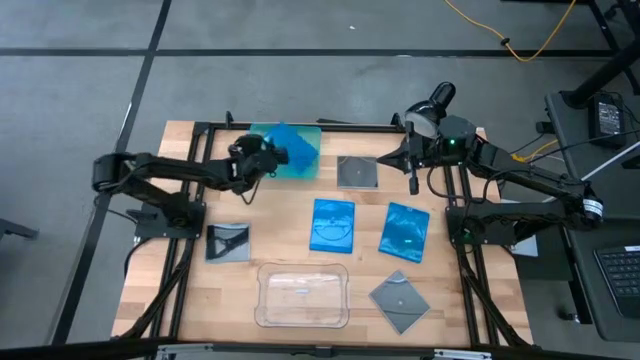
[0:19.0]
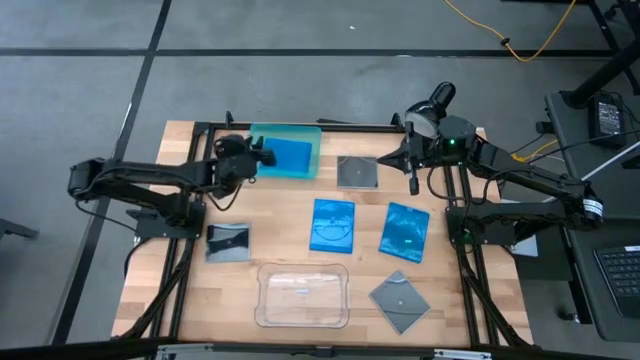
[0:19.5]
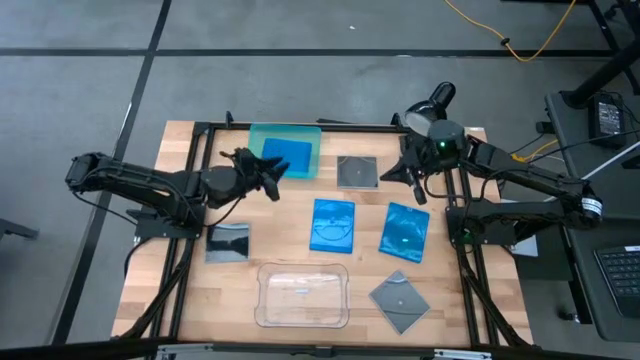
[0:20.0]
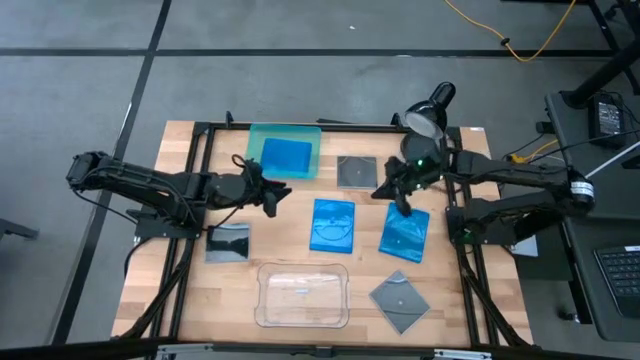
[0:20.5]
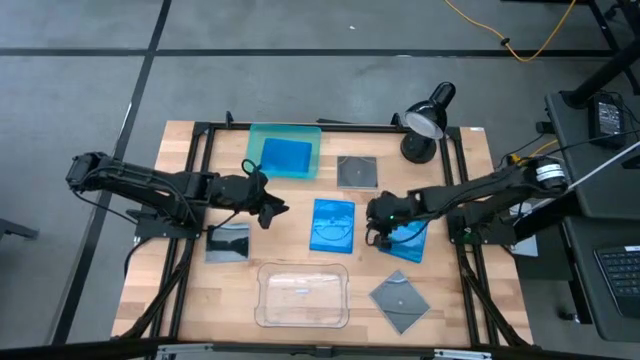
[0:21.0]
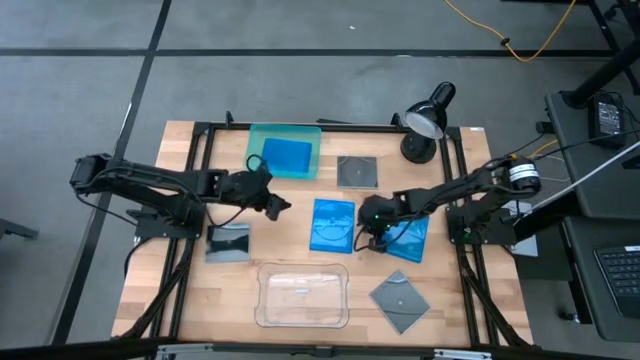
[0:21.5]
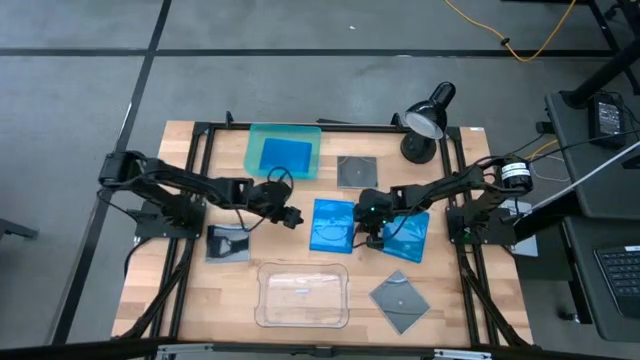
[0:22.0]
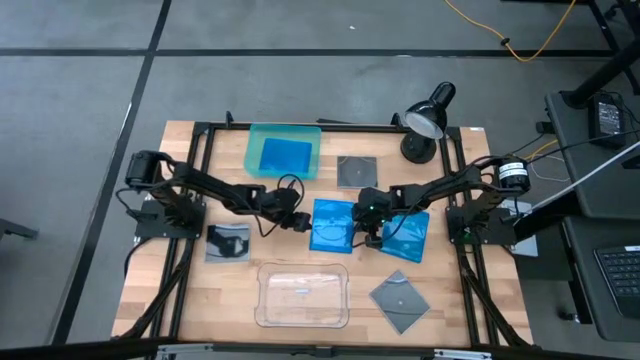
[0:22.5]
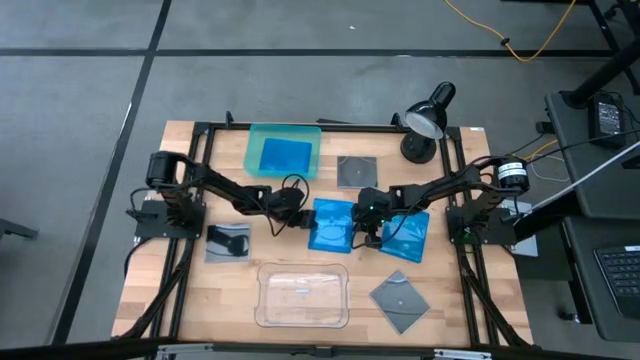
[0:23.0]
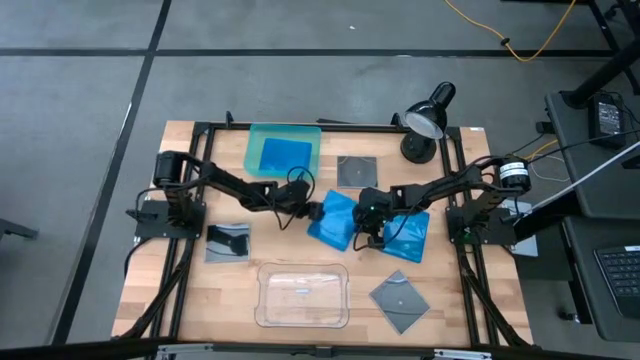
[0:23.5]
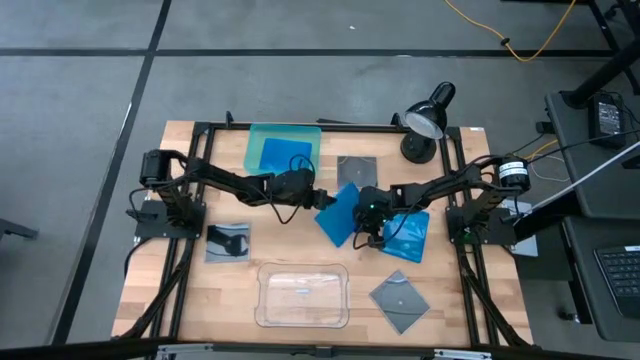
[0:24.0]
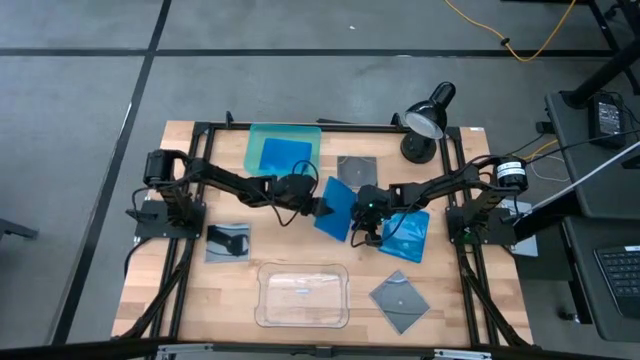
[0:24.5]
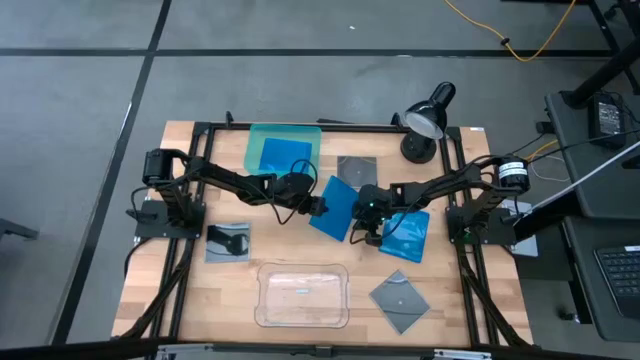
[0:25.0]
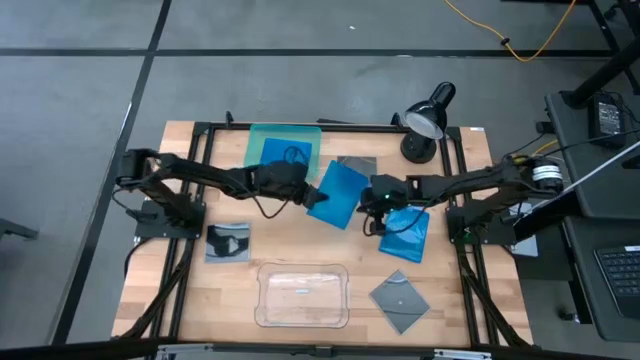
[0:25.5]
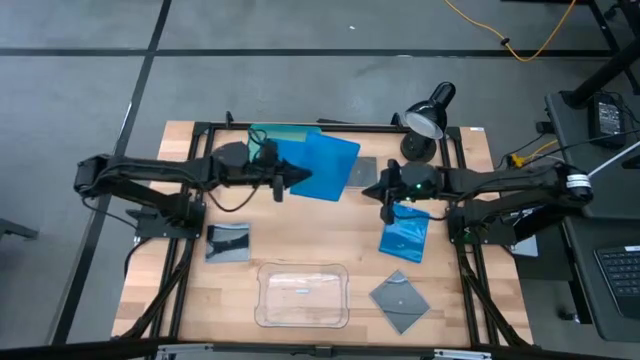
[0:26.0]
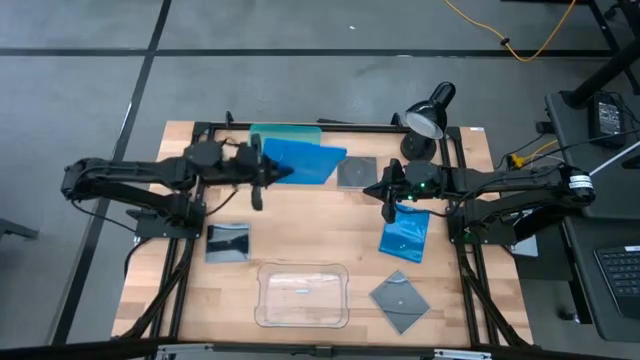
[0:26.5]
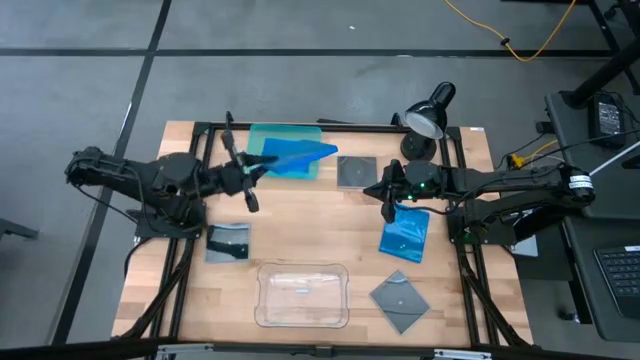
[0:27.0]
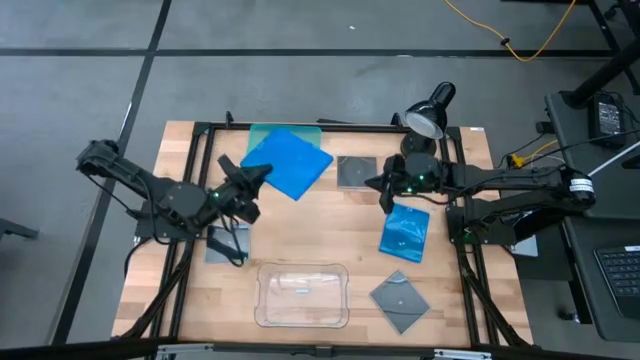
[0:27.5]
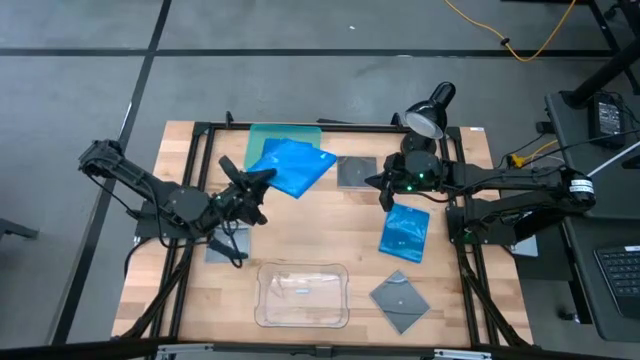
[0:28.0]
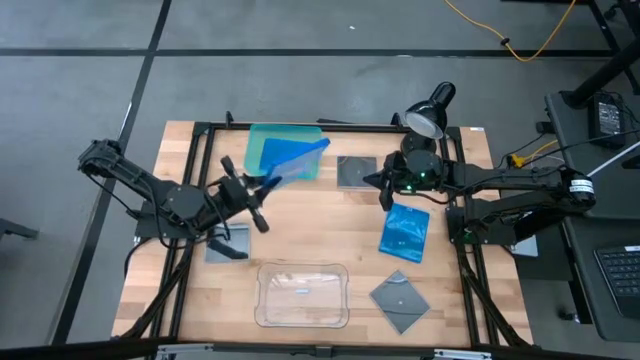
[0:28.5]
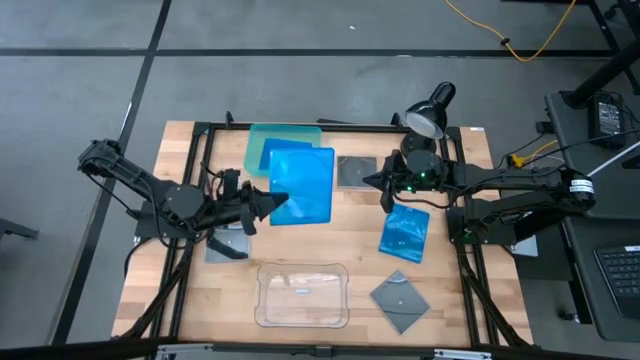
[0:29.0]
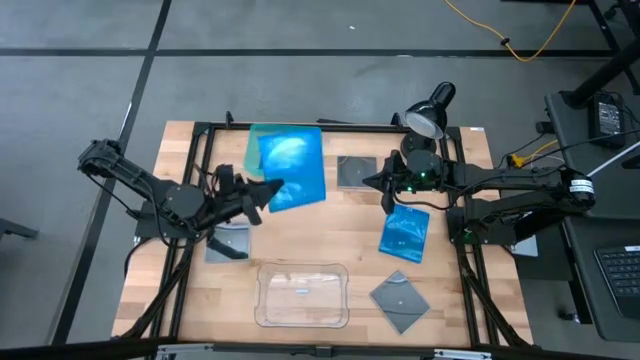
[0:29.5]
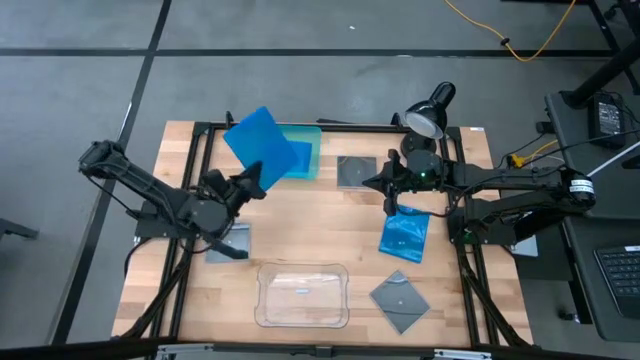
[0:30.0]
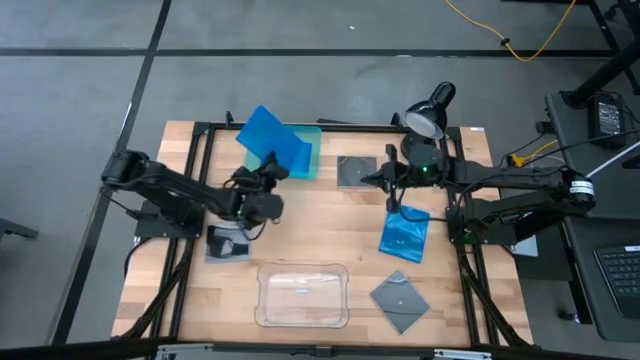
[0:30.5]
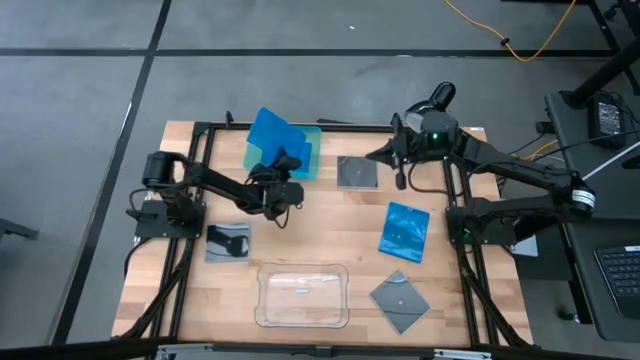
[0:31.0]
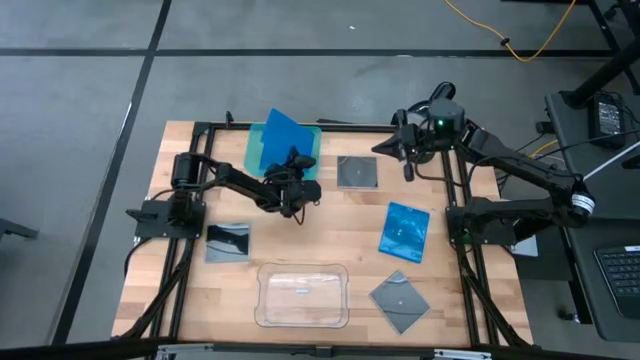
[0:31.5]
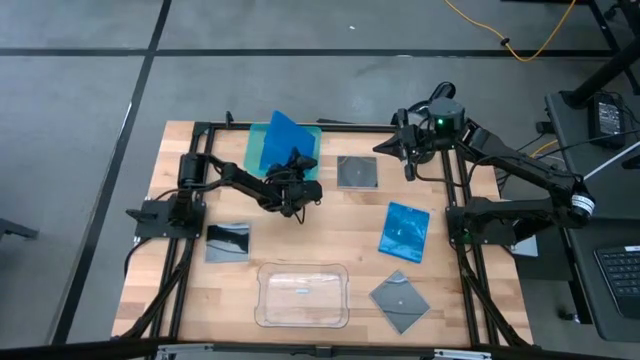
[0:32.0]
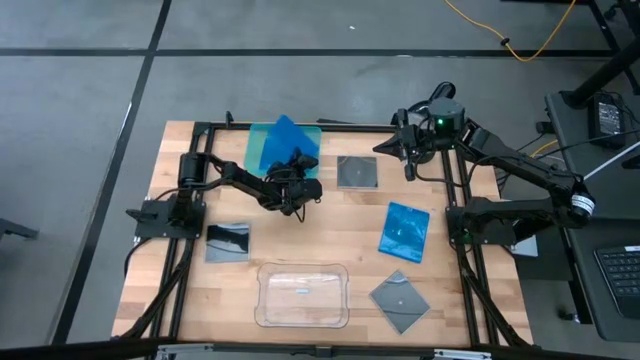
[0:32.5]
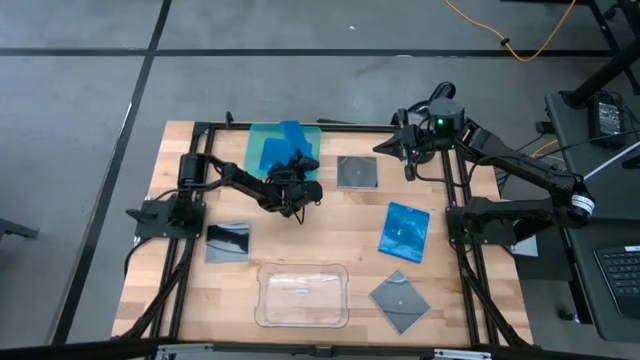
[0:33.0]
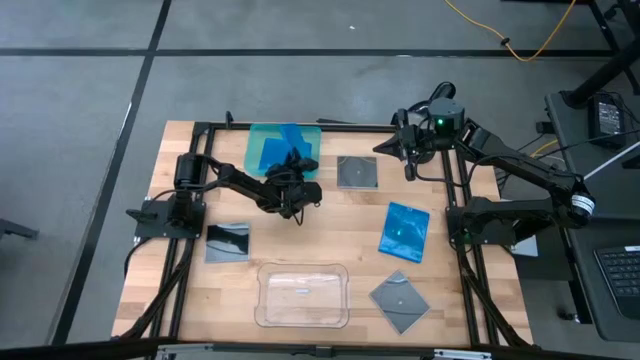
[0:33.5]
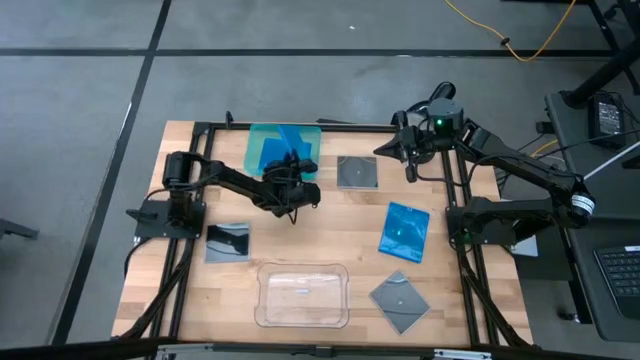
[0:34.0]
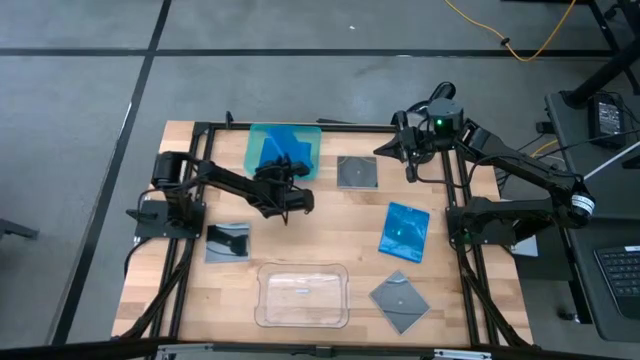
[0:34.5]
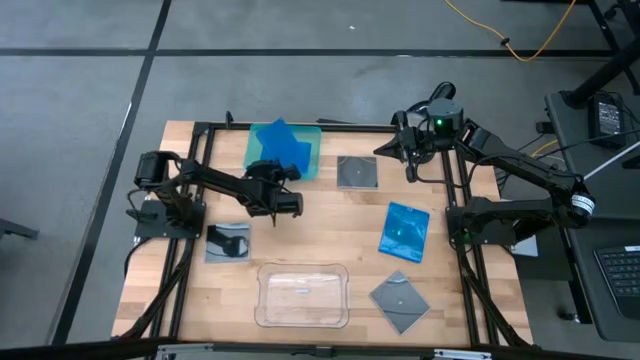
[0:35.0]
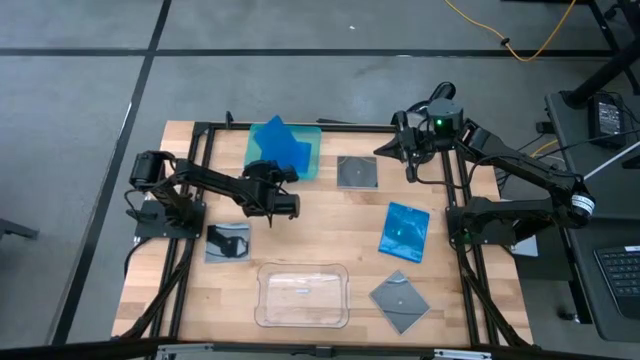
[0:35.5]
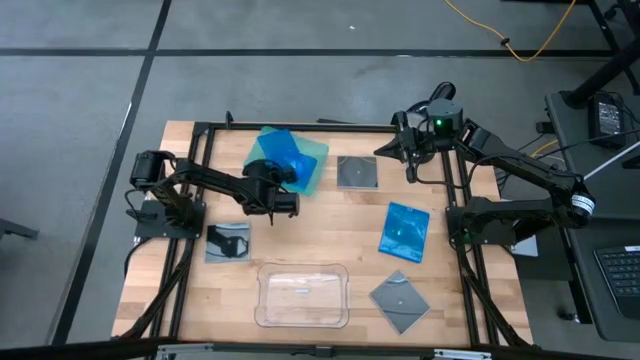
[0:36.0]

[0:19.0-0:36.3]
Task: Pick & place jewel cases by type
Put the left blue cd case into the green bin

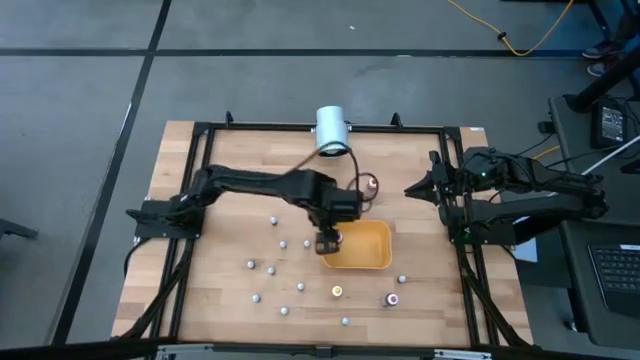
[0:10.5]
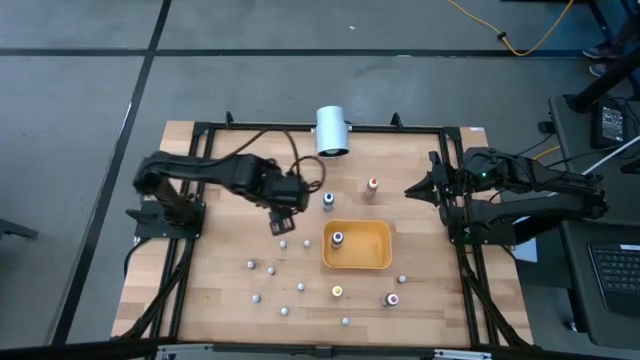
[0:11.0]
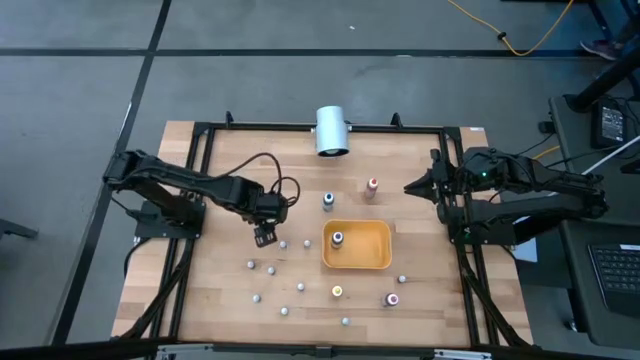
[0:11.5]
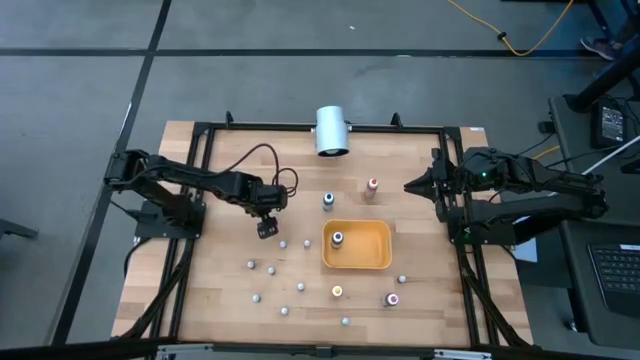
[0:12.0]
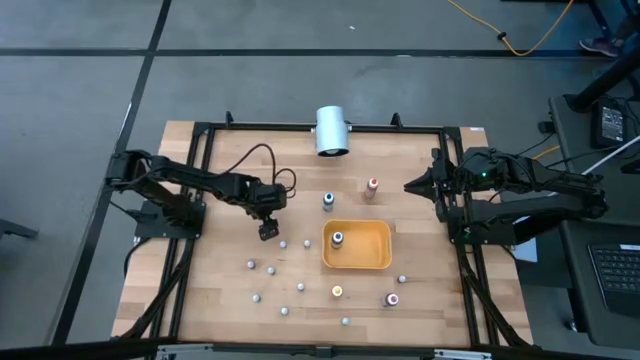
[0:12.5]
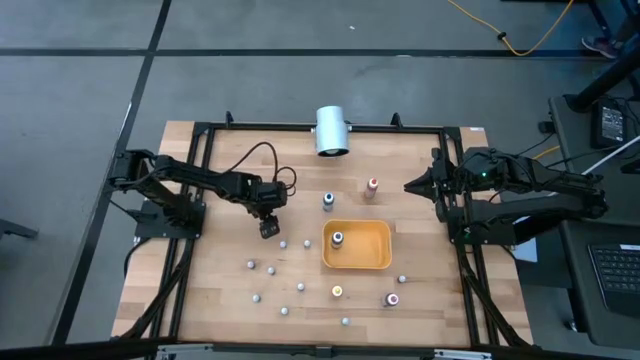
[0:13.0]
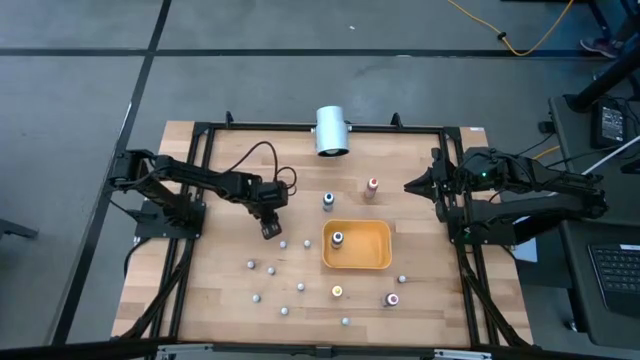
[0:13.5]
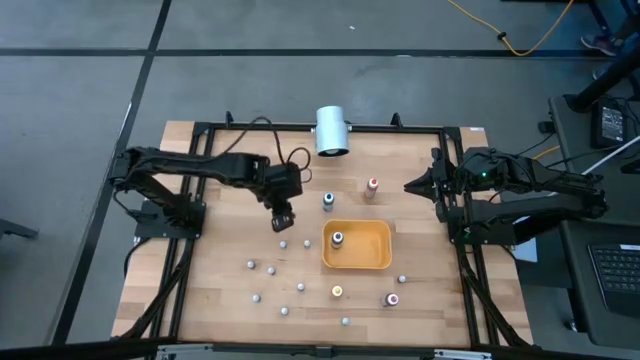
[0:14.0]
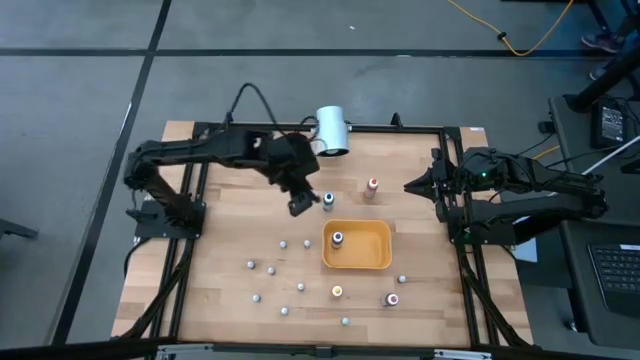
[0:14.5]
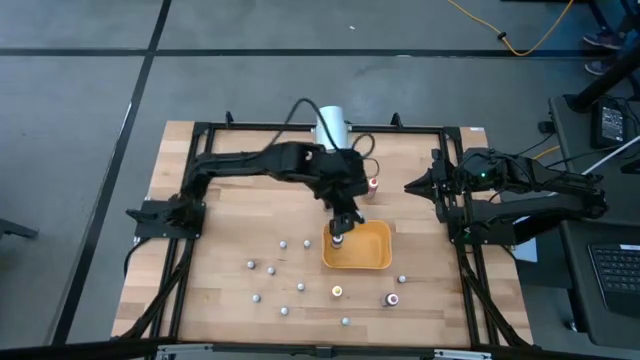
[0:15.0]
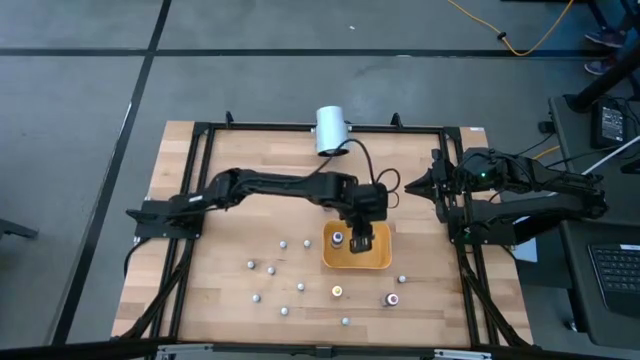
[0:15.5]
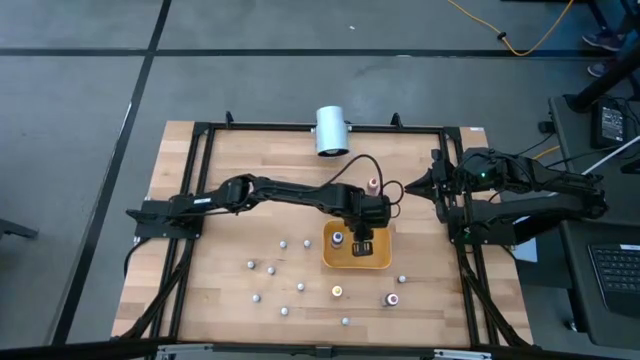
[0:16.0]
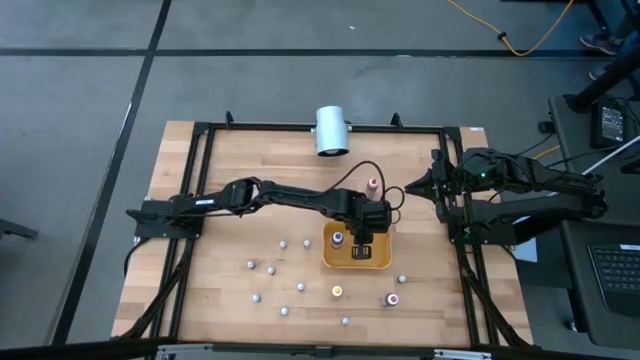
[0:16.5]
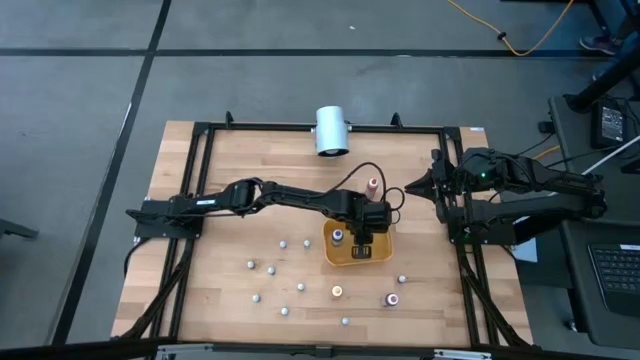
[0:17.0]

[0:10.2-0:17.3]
Task: Pick & Place food coloring
Put the small green food coloring bottle into the yellow bin
